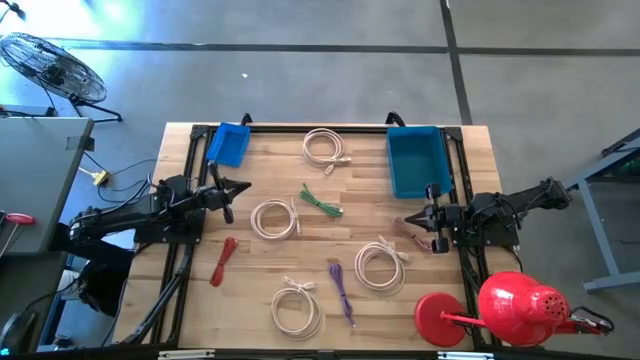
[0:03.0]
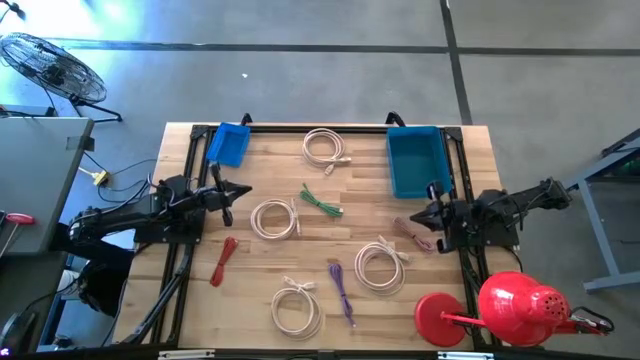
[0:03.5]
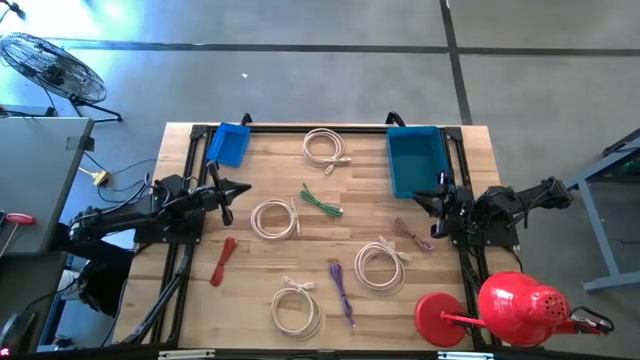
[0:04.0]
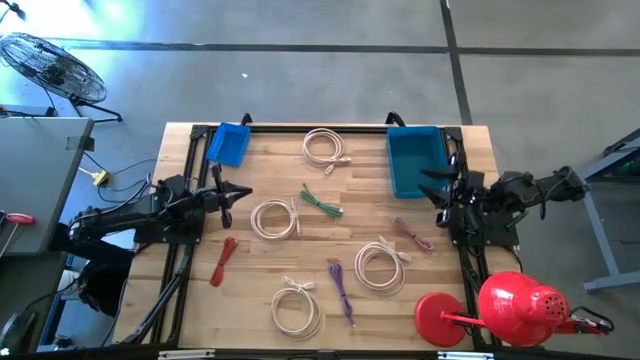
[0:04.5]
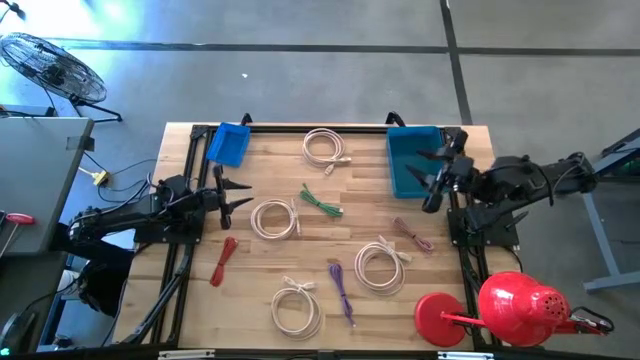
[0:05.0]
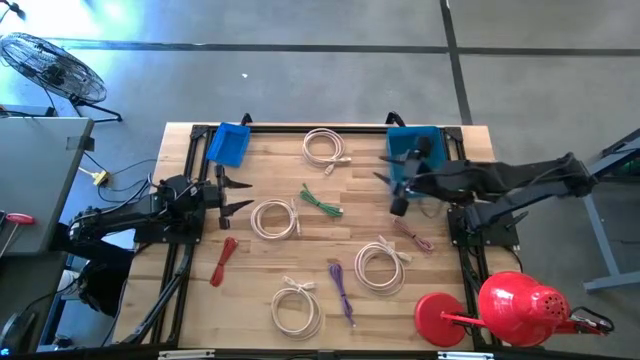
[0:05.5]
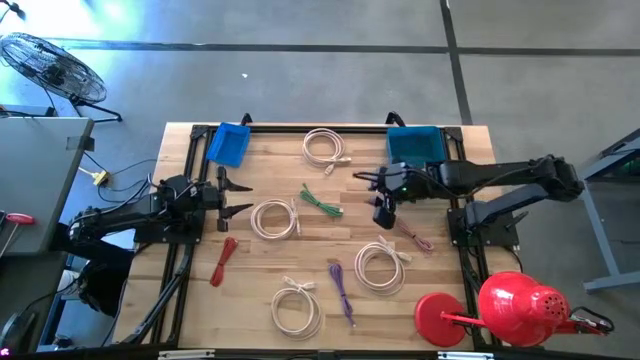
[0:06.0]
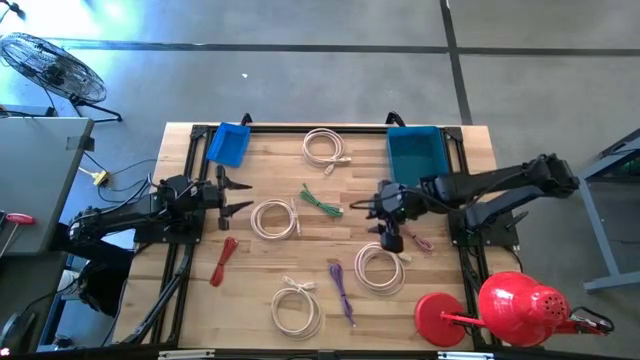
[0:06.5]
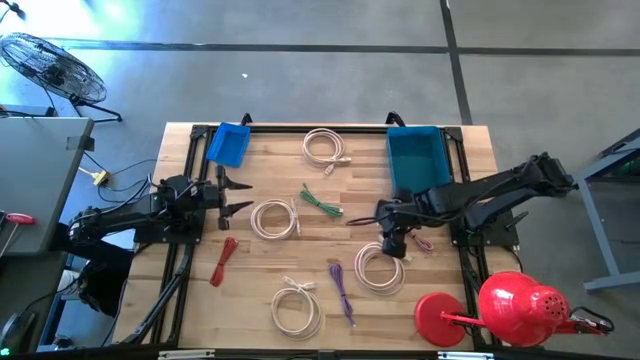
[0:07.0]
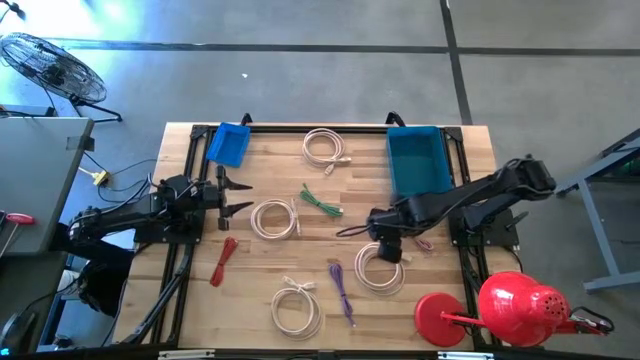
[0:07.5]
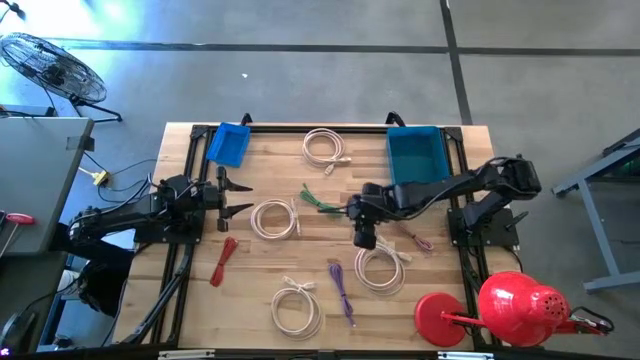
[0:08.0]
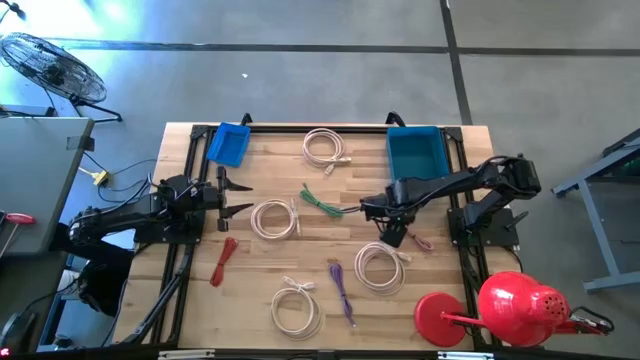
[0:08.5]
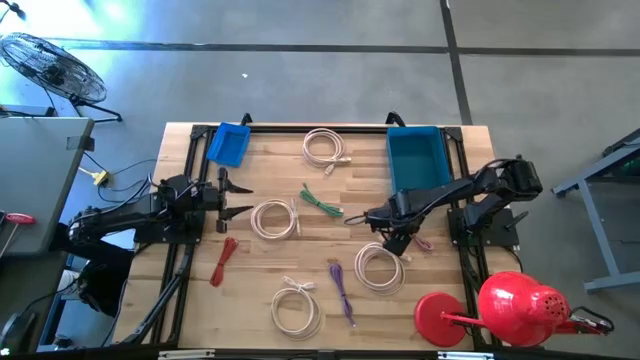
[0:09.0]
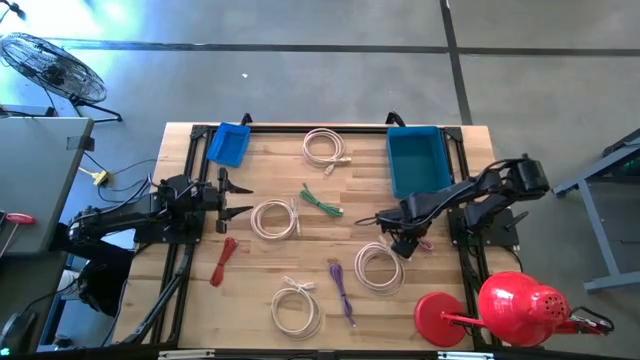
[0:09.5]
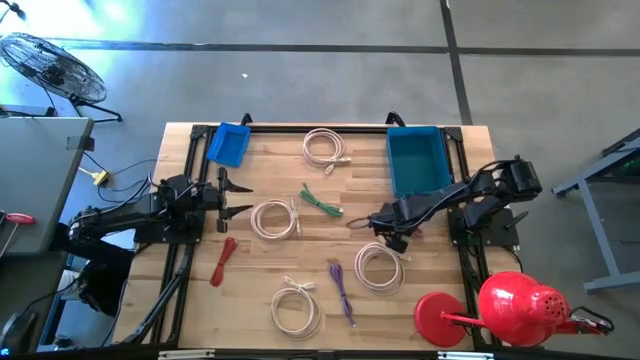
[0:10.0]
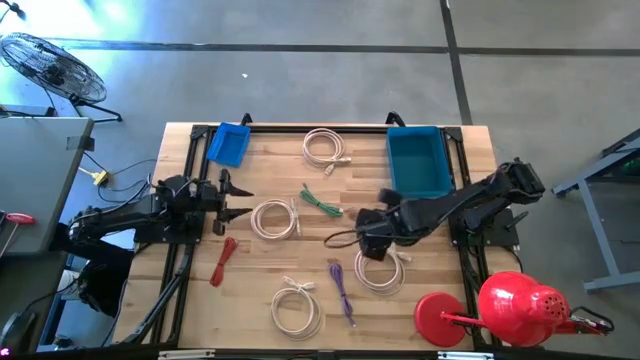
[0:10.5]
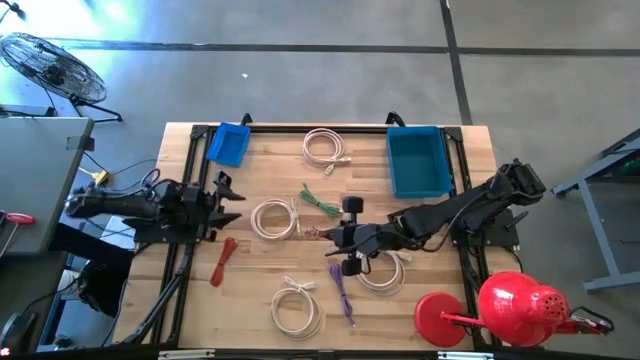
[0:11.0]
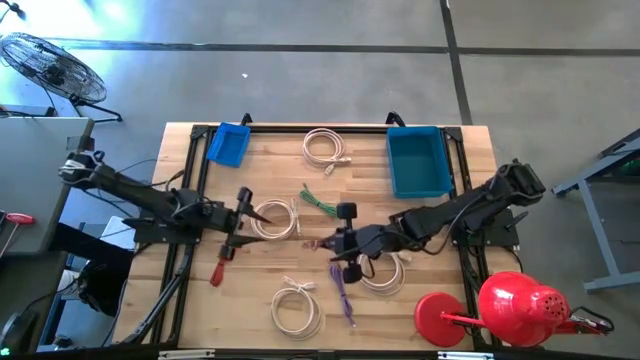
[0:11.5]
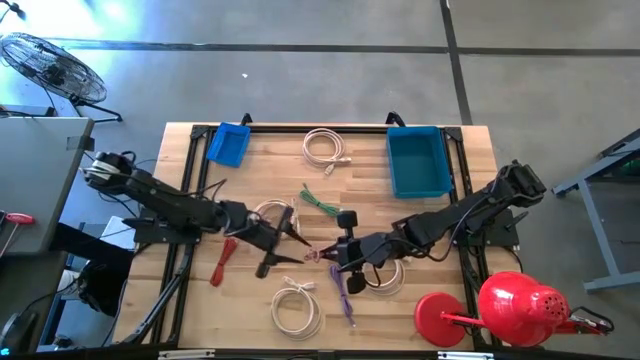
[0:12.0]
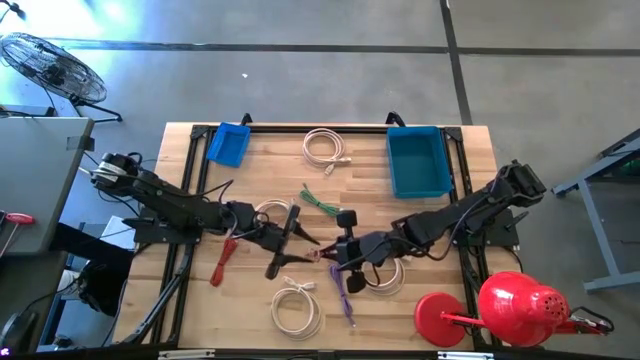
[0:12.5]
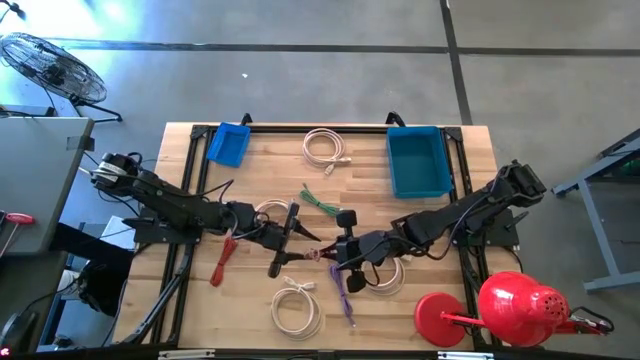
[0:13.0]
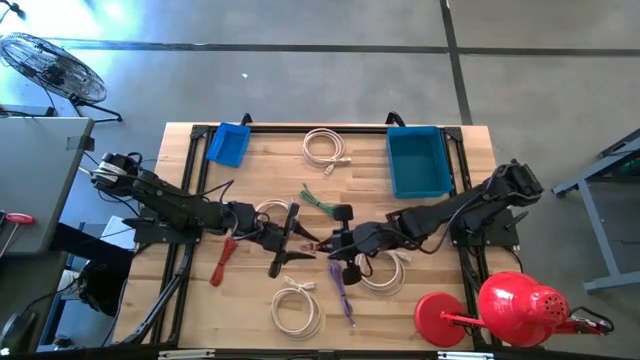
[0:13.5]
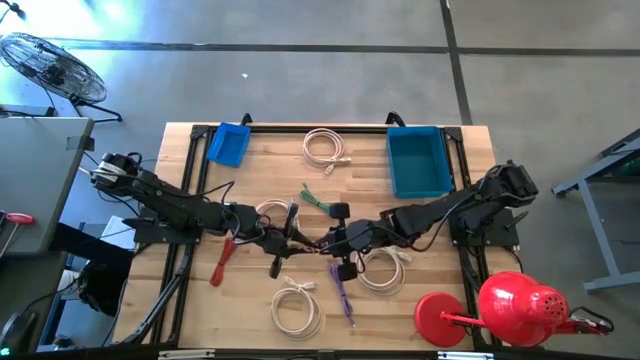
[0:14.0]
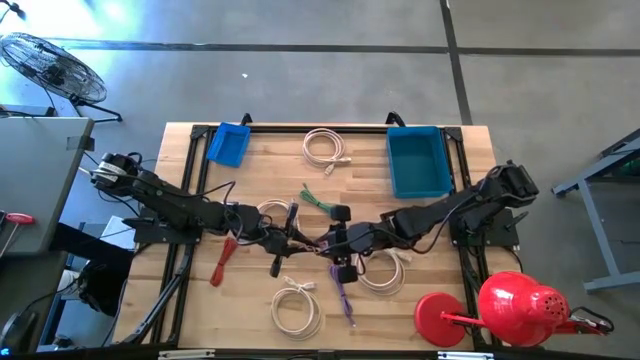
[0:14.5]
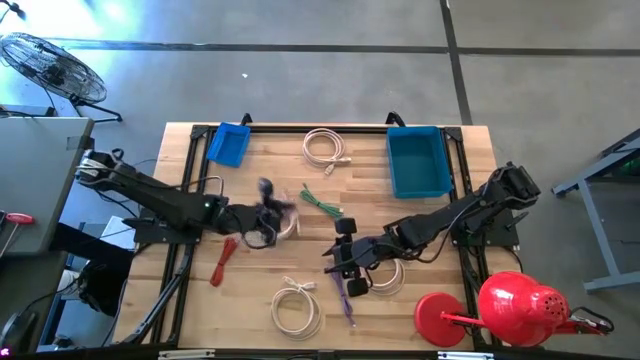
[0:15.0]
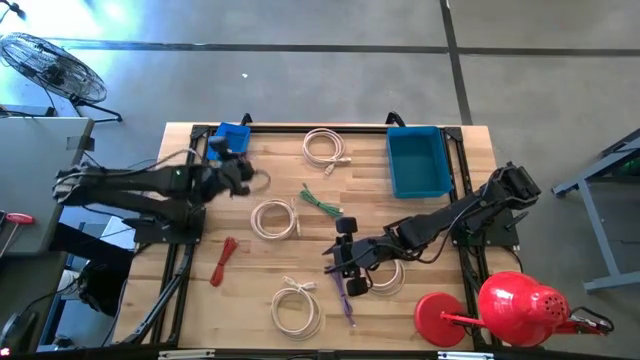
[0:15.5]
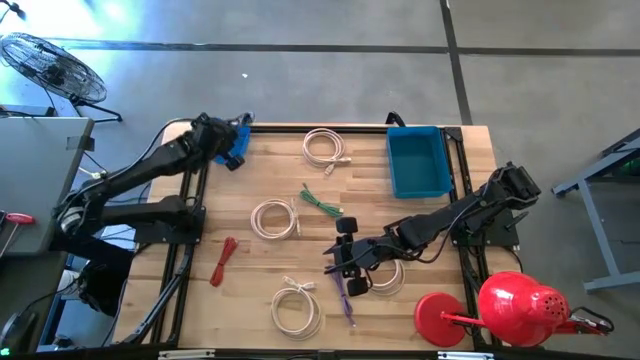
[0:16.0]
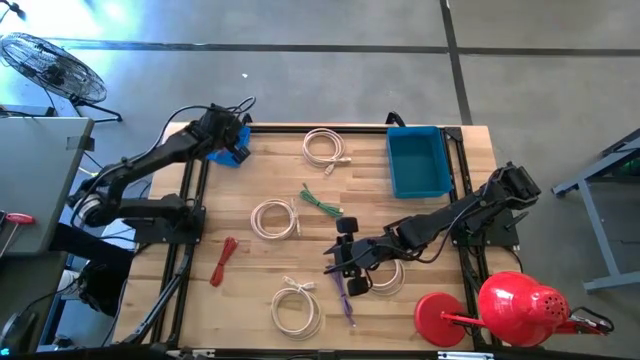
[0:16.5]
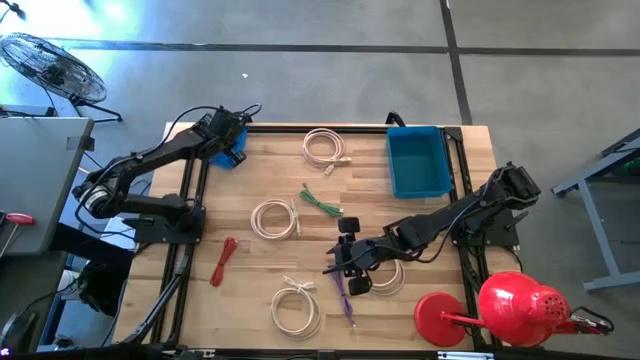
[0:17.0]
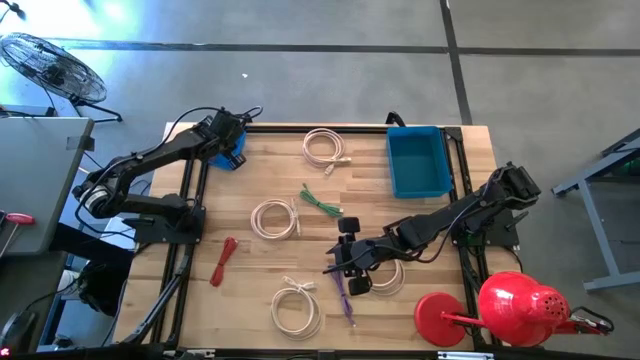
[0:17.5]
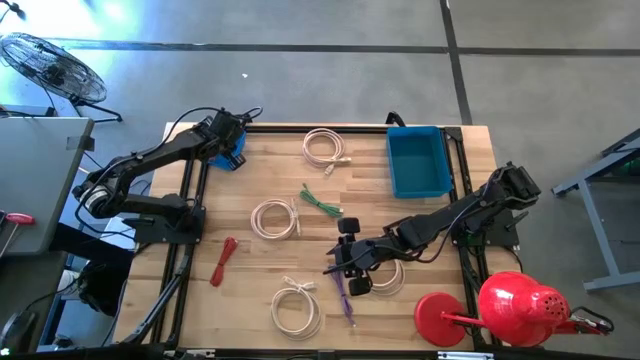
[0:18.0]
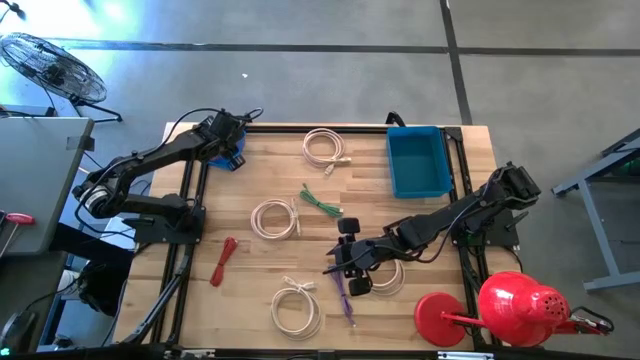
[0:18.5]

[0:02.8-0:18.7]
Task: Pick & Place USB Port
Put the pink USB cable into the left blue bin

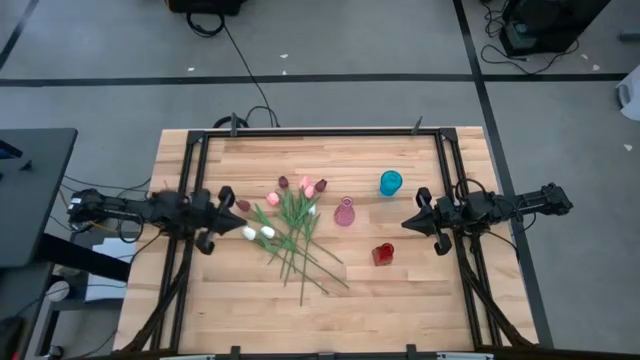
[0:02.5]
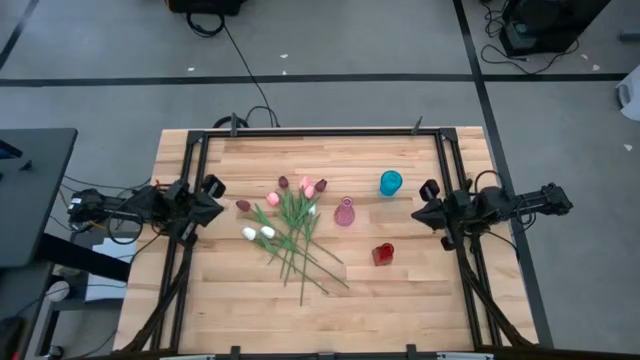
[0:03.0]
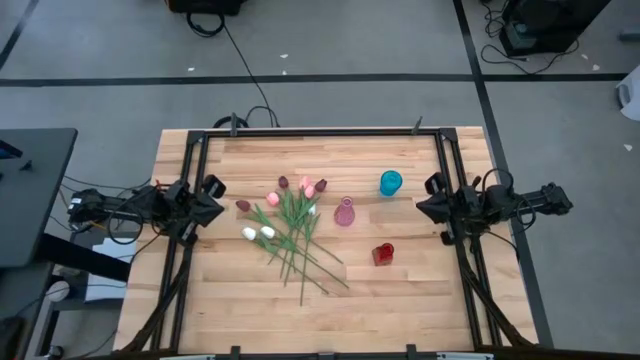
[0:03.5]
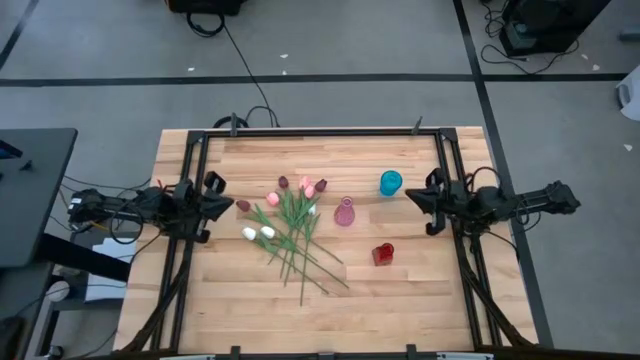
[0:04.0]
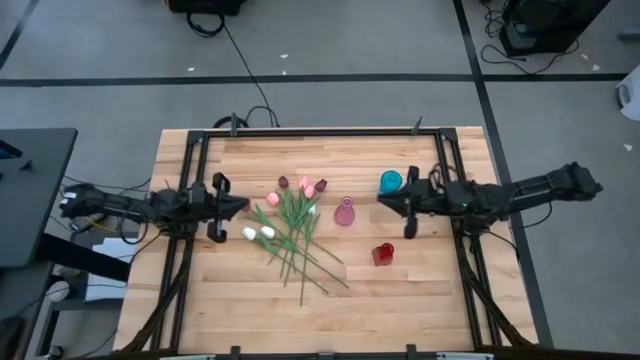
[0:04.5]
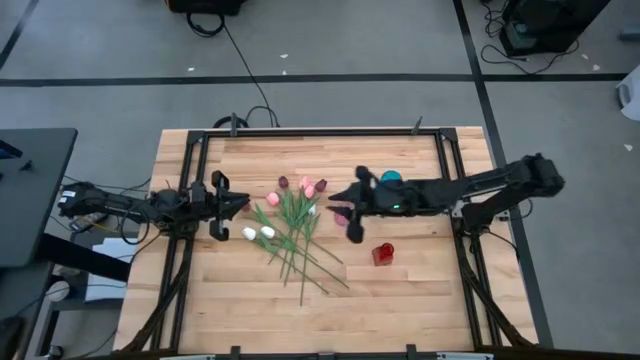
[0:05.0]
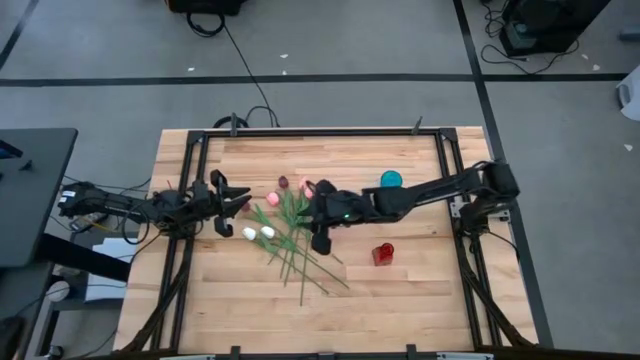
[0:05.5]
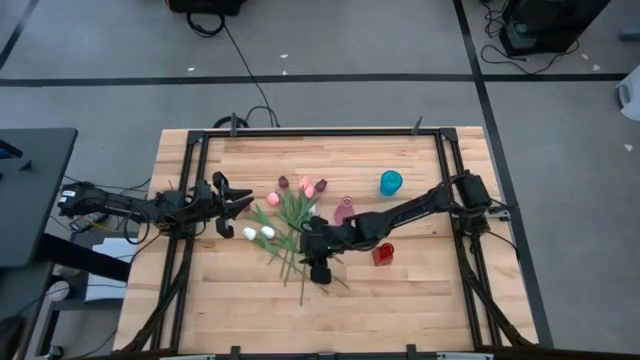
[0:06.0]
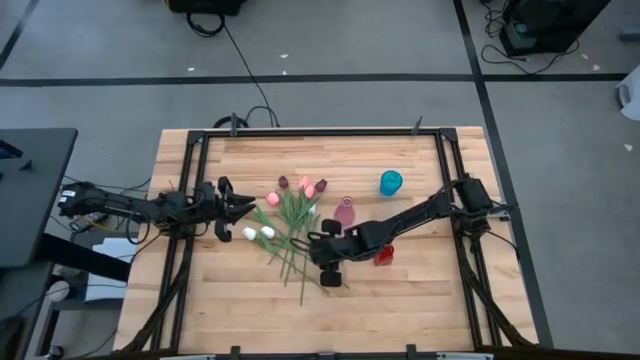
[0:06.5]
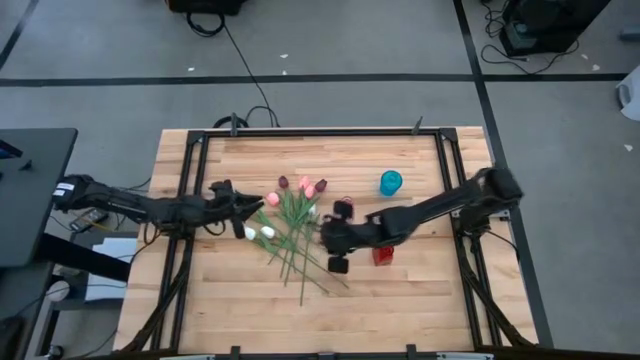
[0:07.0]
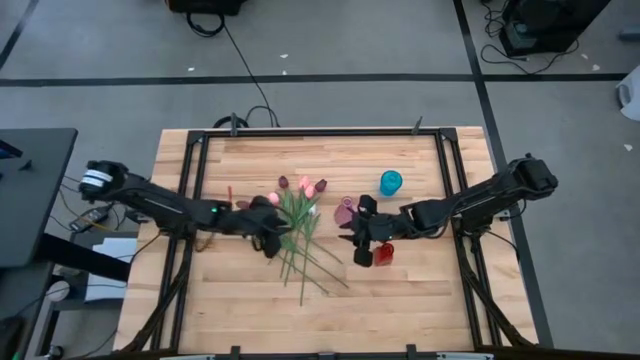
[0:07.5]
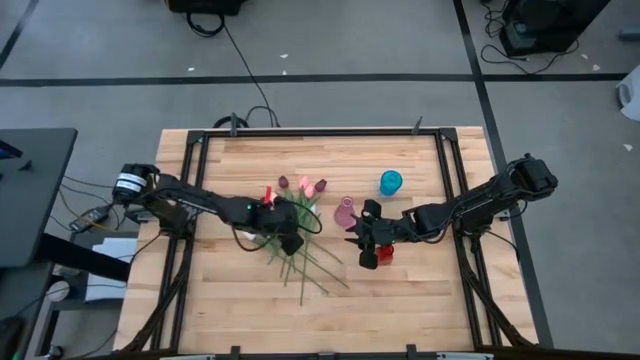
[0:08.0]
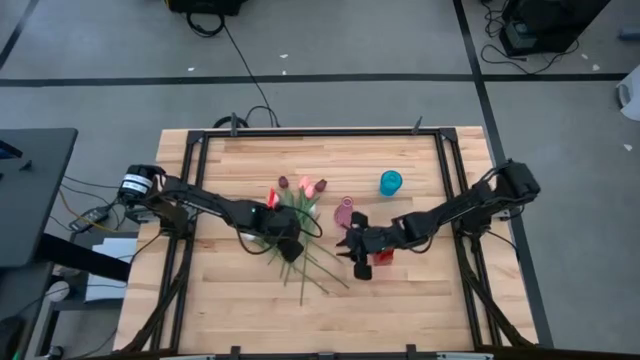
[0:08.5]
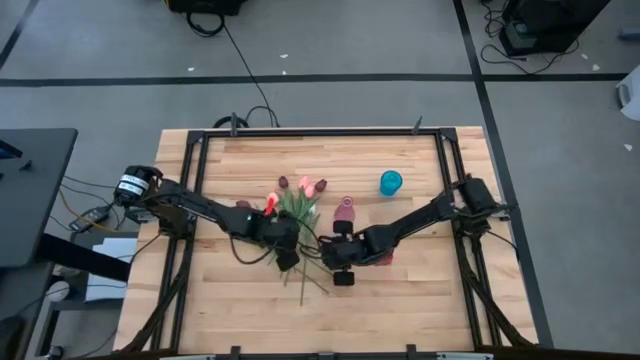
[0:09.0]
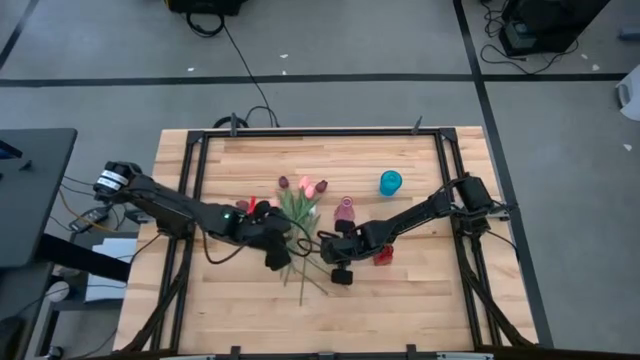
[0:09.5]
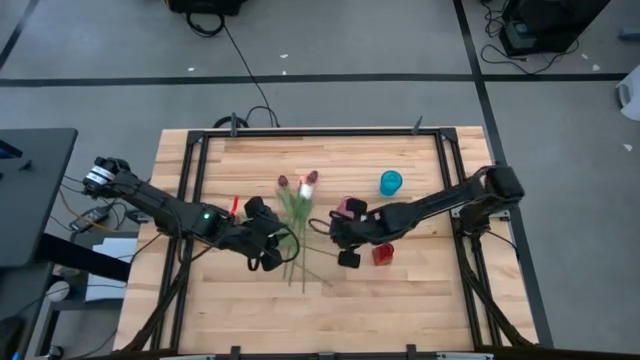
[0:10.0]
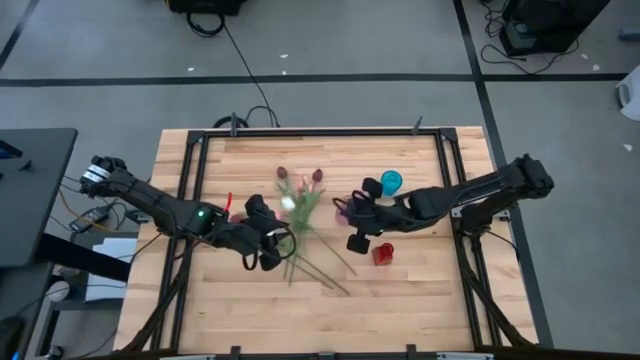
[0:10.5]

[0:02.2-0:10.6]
Task: Sort flowers into vase by color
Put the pink flower into the purple vase
